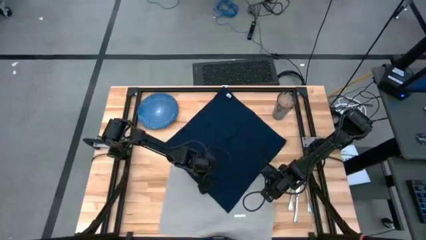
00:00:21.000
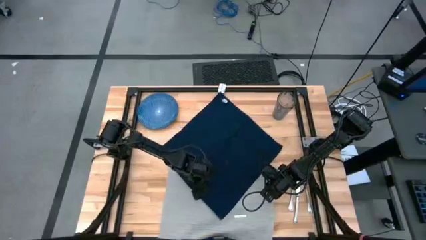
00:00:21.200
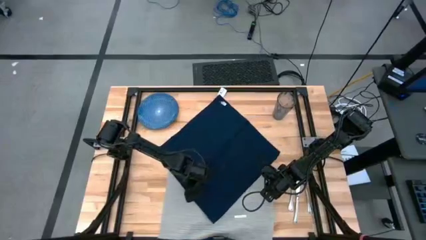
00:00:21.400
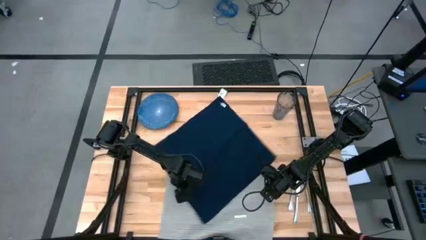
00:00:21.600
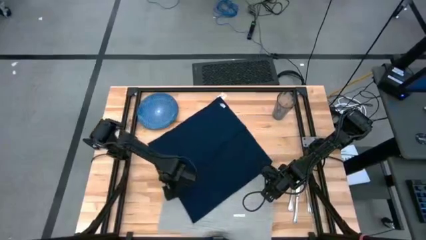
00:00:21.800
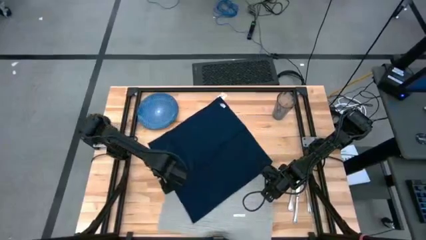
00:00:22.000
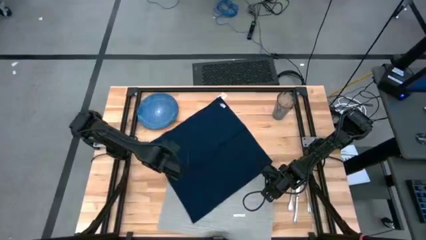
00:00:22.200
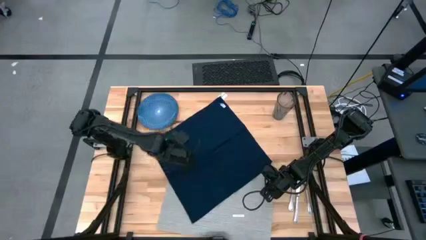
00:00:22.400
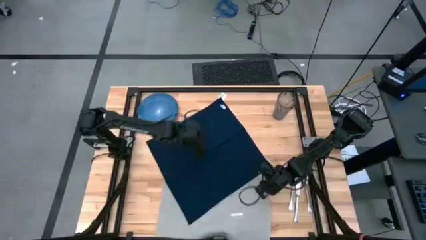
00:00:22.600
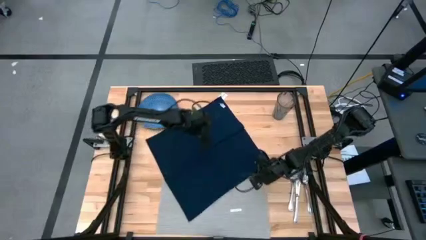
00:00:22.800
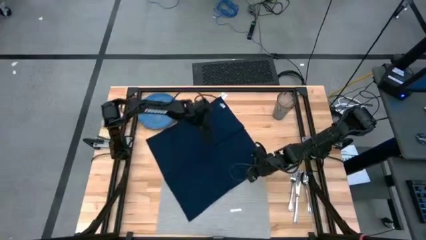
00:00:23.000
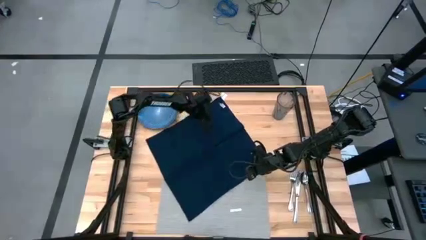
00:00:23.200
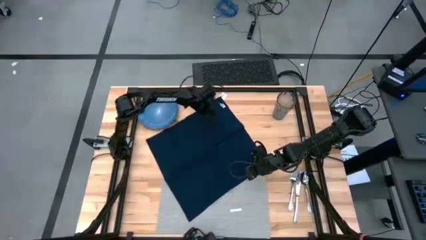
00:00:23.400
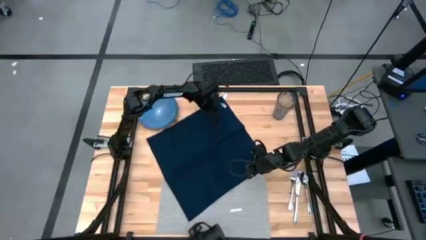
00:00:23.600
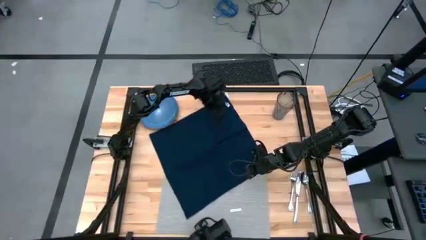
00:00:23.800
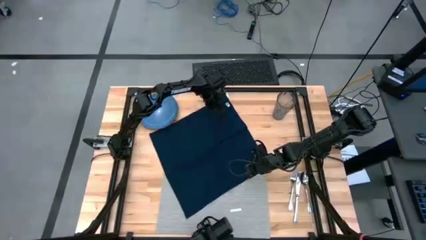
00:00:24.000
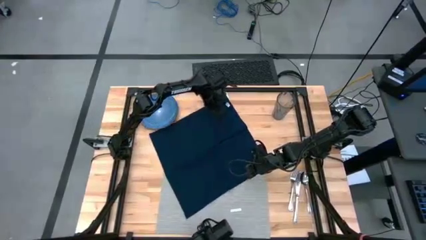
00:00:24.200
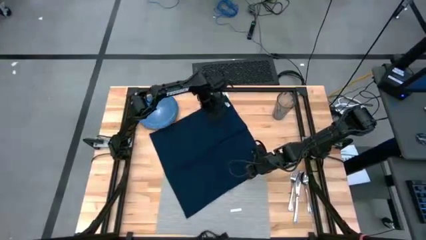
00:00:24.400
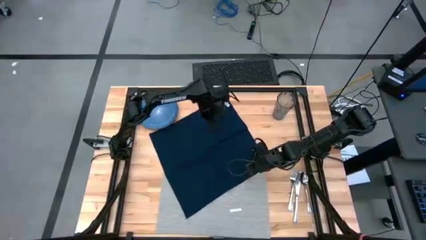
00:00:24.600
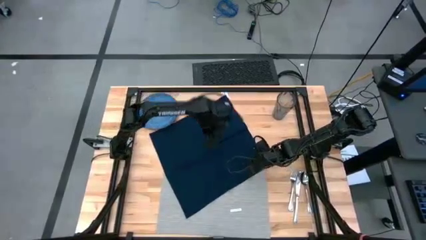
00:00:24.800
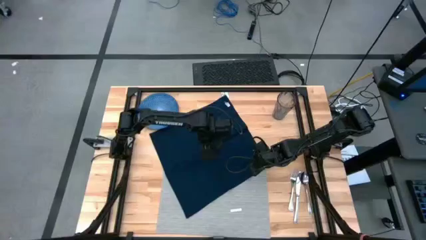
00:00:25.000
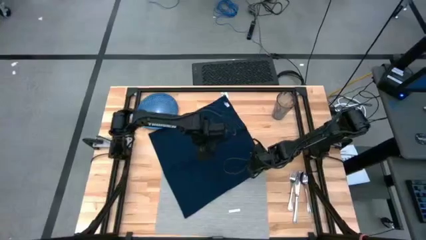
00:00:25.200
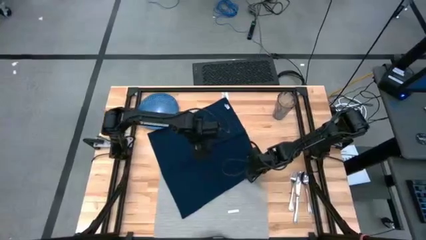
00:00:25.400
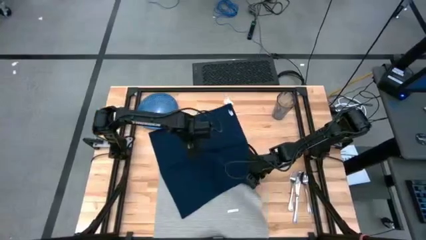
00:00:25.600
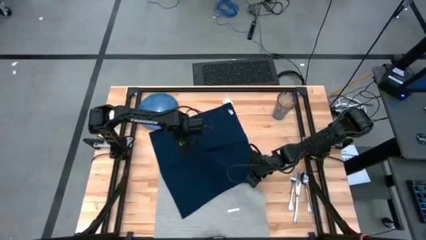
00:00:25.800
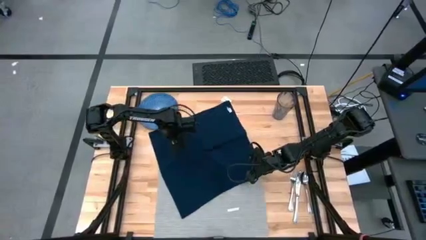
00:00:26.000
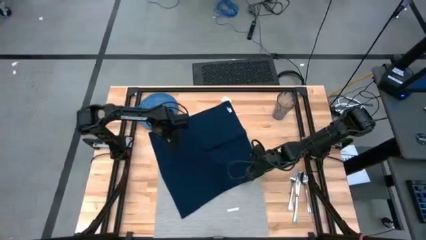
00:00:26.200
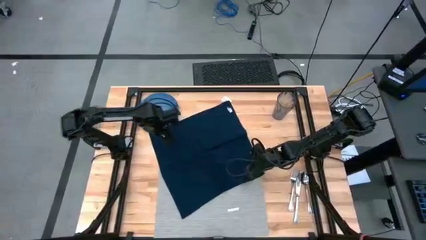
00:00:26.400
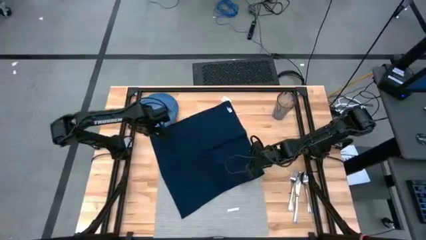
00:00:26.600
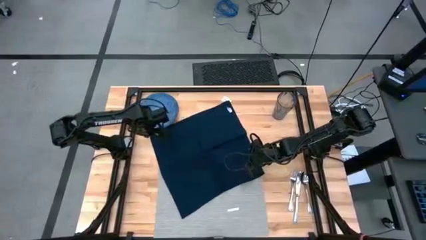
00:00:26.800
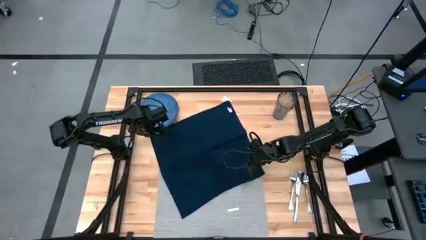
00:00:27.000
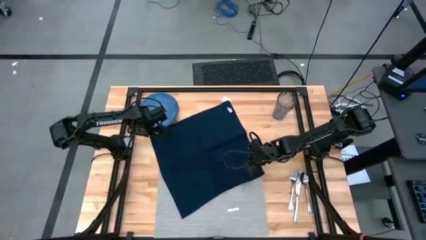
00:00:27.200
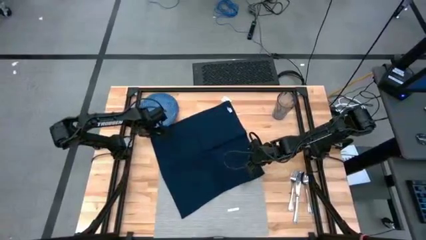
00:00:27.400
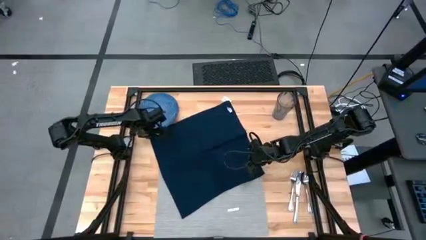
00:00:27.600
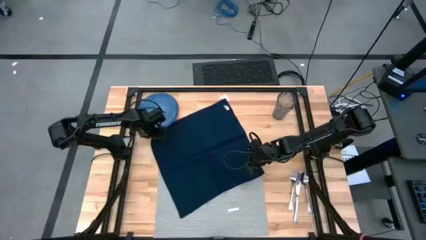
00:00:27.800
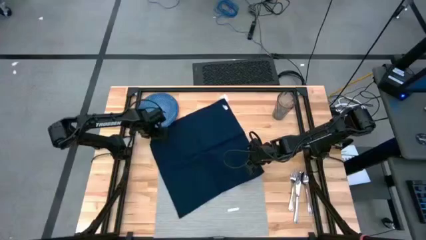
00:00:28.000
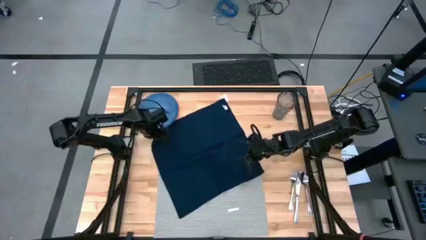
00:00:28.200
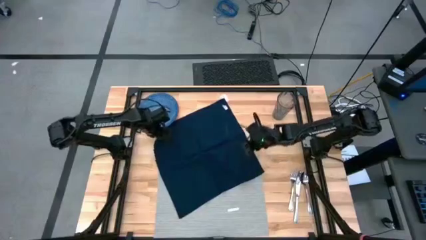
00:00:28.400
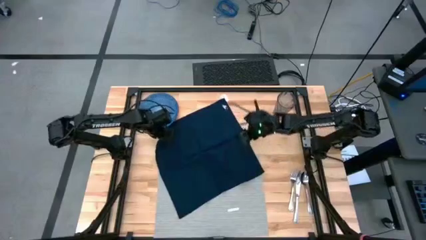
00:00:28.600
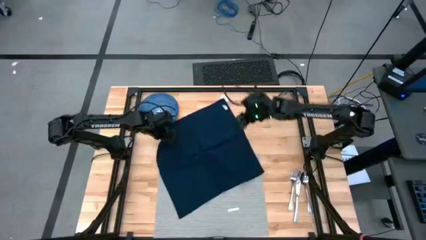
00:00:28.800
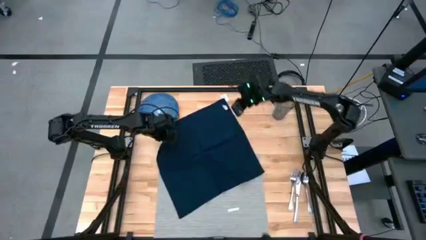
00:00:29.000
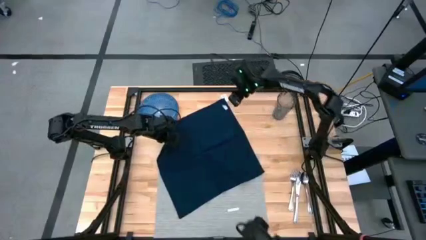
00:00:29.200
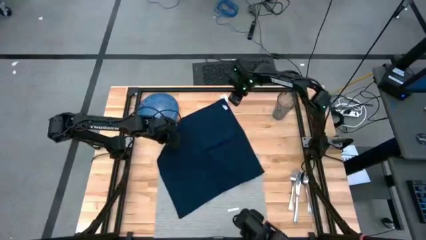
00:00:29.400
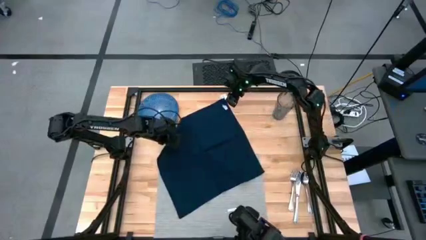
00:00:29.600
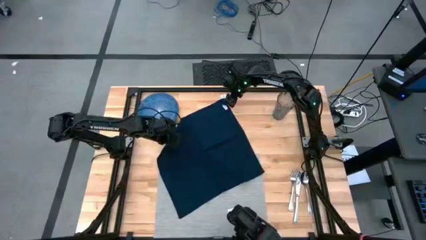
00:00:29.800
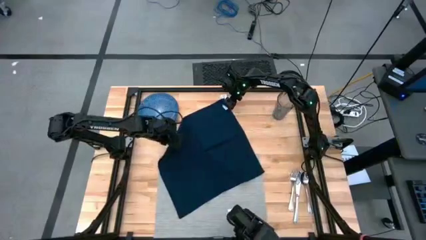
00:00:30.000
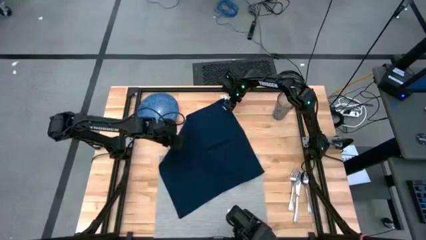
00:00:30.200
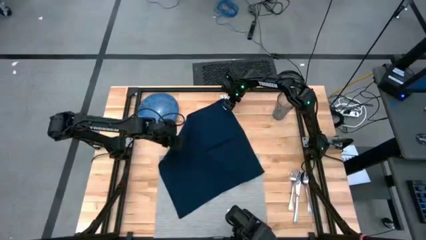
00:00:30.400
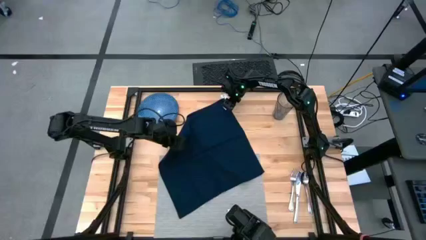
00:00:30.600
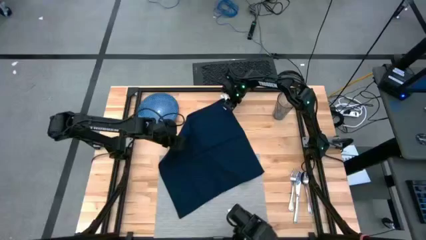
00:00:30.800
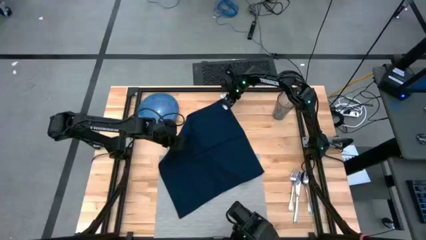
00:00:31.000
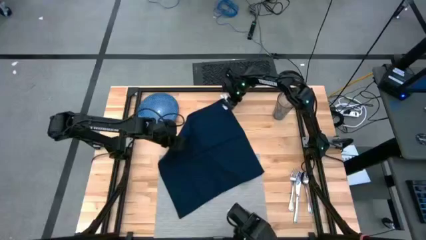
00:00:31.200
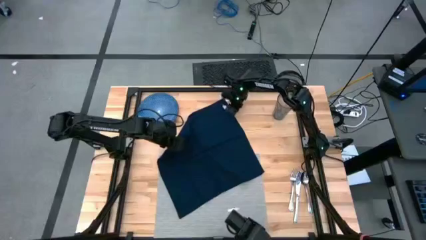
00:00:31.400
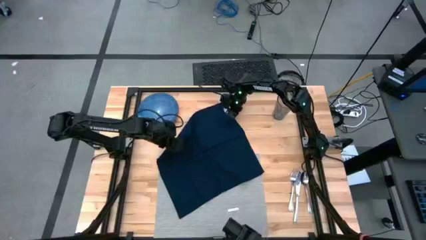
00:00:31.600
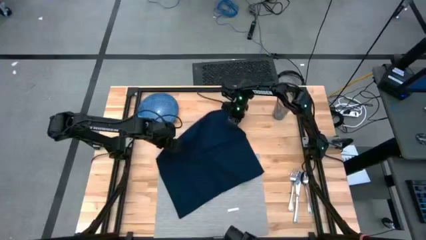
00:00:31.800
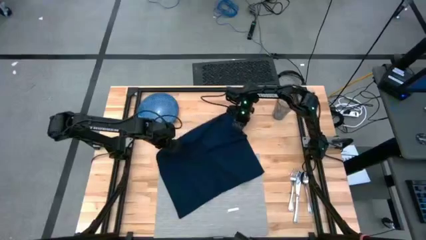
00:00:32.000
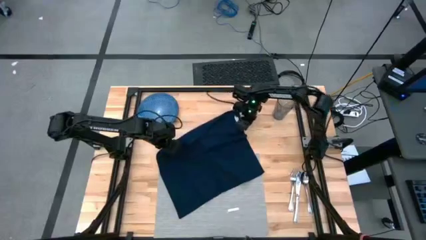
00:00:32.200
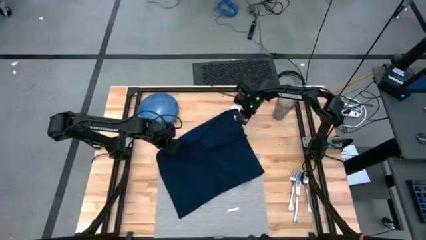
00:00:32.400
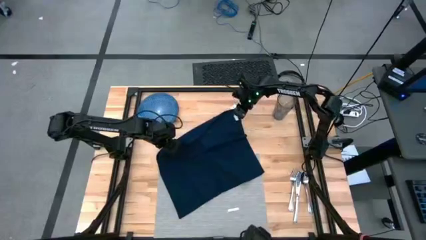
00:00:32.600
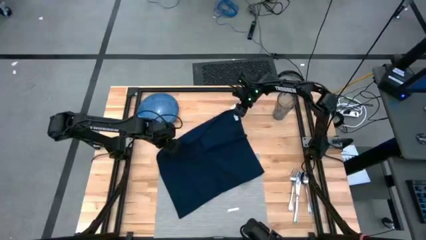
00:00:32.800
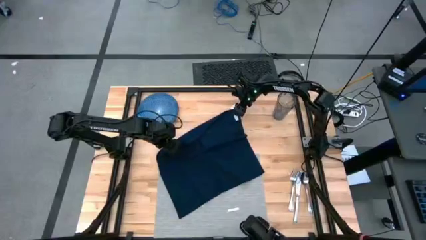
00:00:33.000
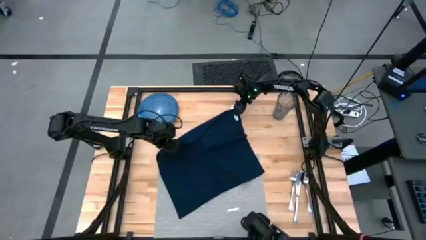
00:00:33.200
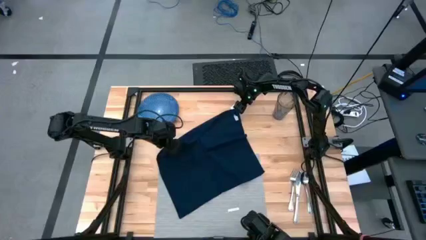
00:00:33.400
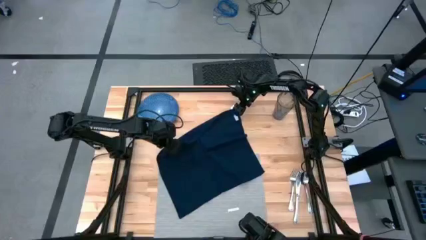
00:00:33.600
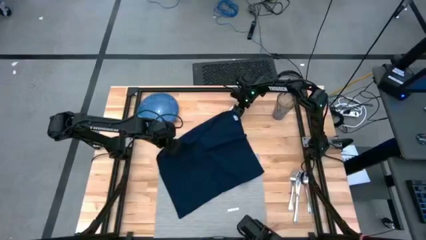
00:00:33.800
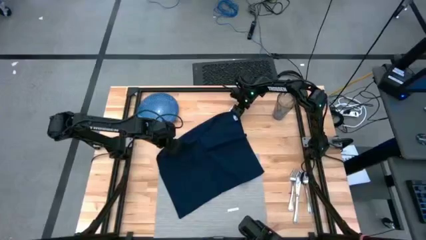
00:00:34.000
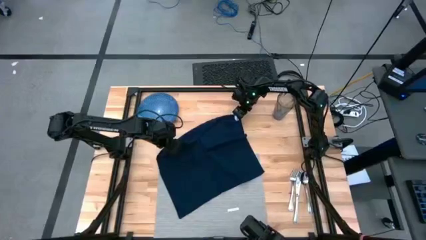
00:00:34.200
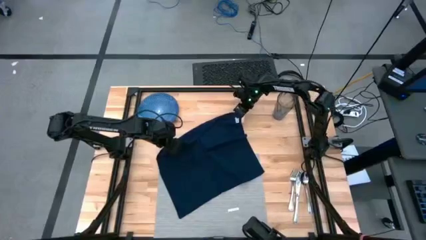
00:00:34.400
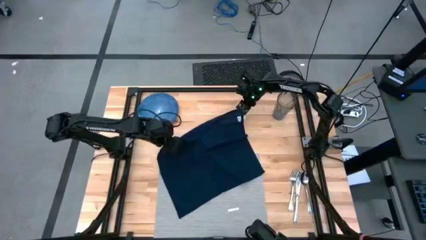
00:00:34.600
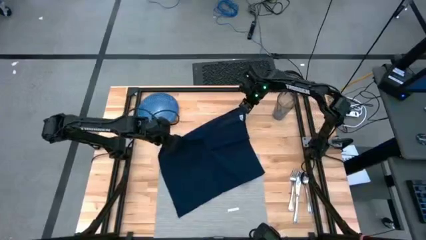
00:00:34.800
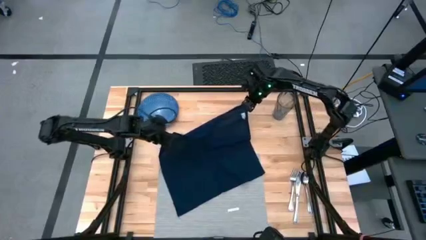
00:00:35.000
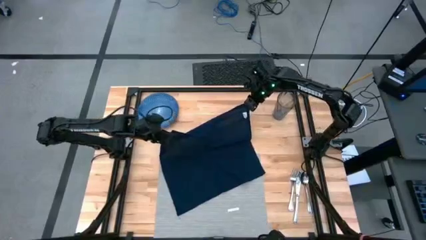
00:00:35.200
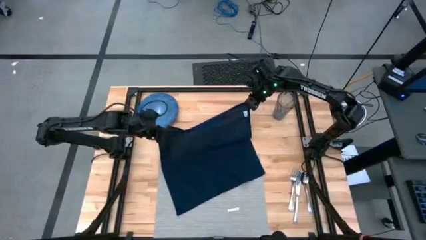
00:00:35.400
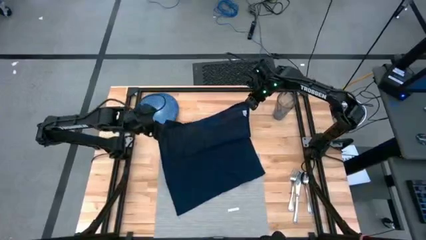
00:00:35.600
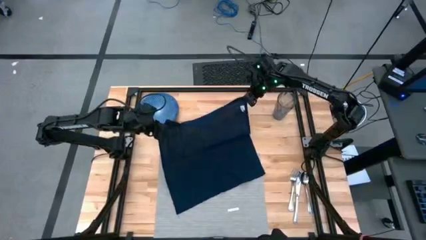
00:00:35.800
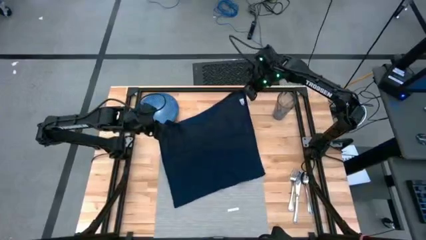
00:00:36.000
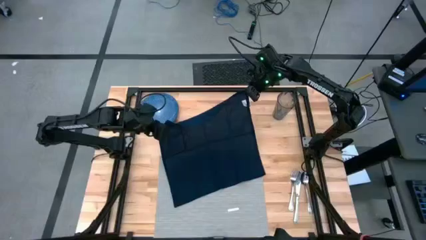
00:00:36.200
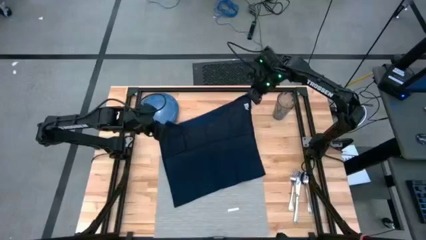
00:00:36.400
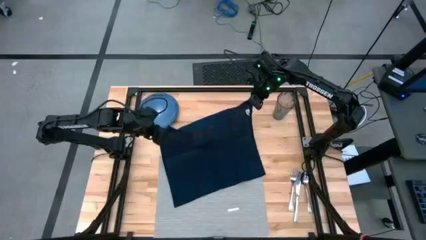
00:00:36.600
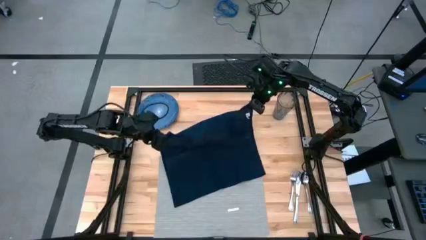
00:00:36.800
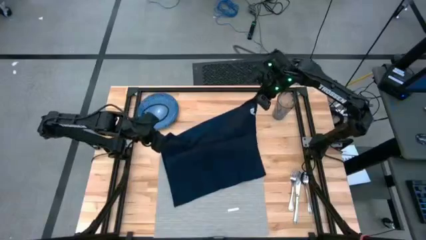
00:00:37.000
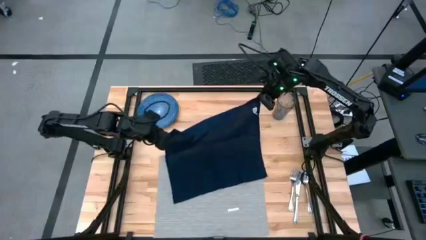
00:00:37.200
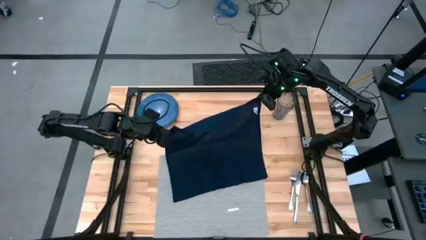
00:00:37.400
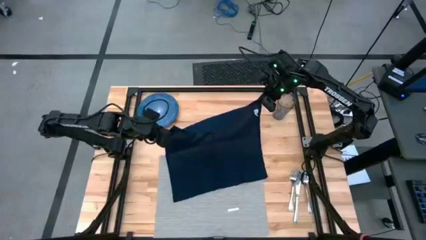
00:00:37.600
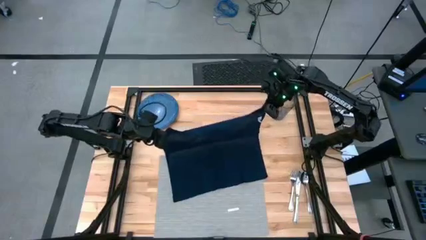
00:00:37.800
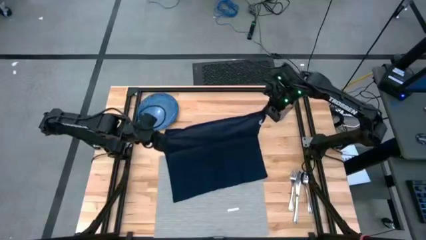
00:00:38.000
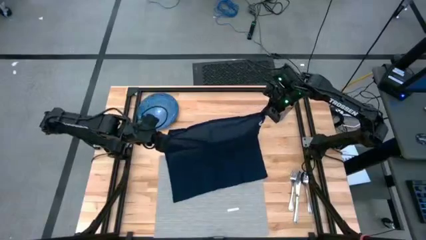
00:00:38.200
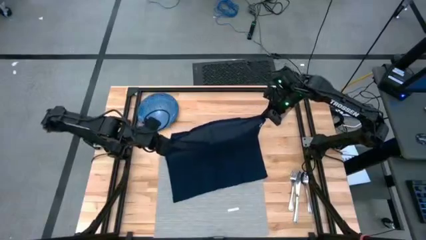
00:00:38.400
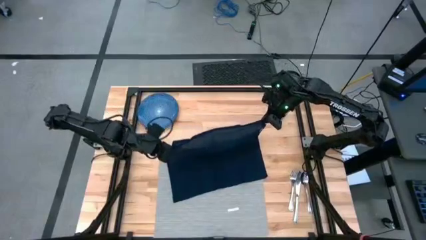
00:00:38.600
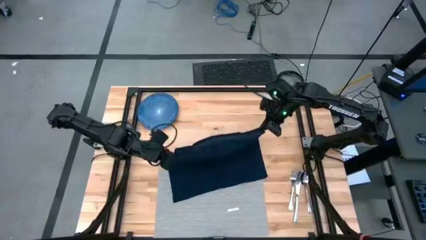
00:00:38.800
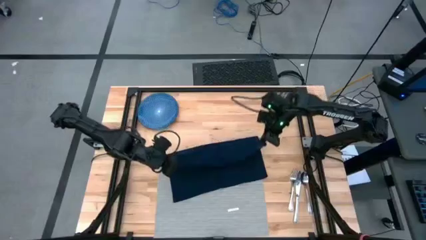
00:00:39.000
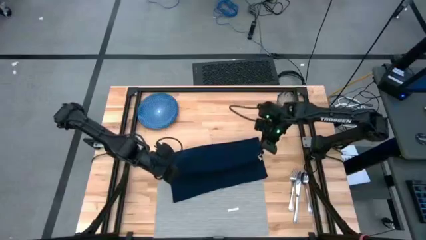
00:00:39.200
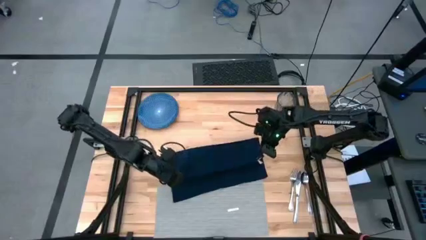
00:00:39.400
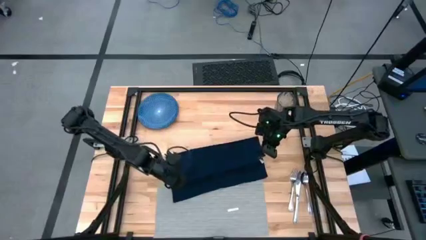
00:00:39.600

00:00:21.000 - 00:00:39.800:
Task: Set table place
Fold the dark blue napkin
